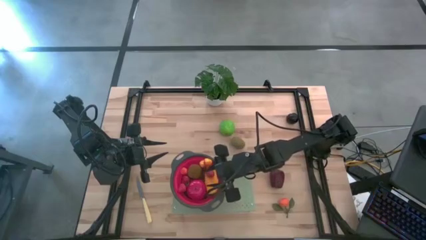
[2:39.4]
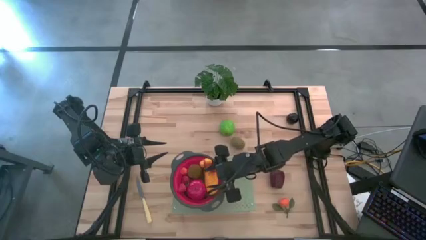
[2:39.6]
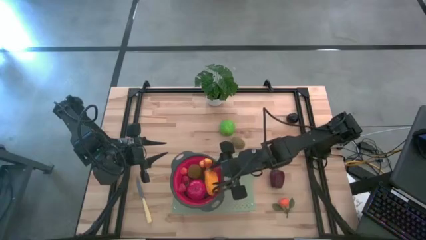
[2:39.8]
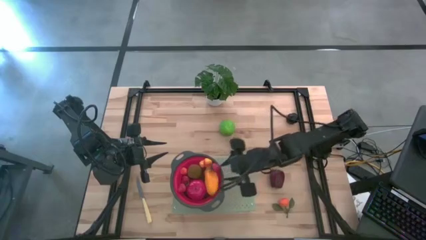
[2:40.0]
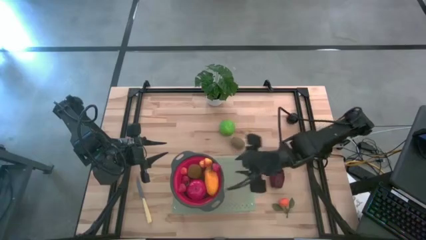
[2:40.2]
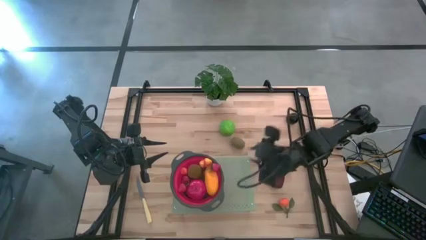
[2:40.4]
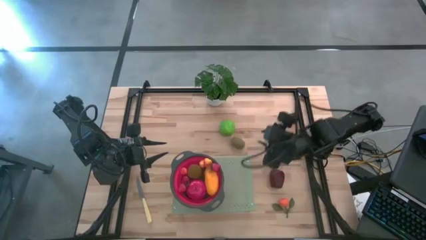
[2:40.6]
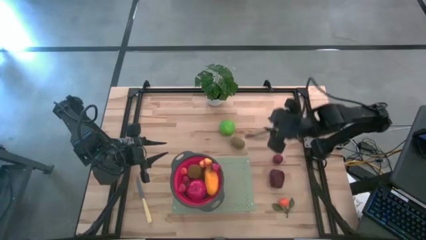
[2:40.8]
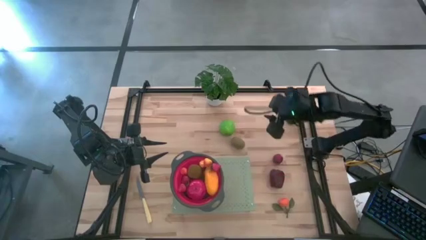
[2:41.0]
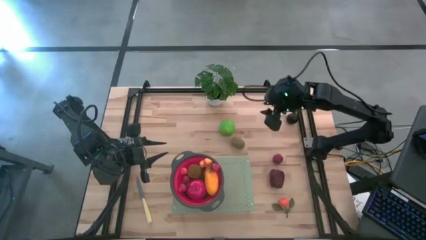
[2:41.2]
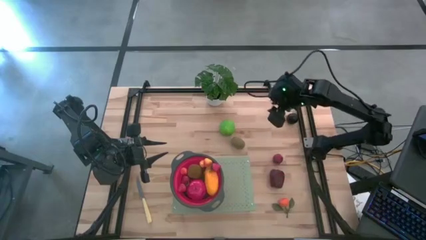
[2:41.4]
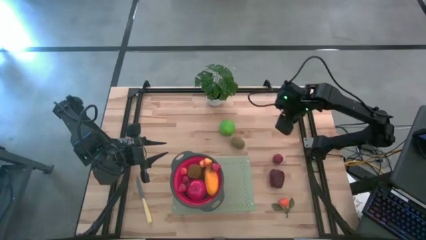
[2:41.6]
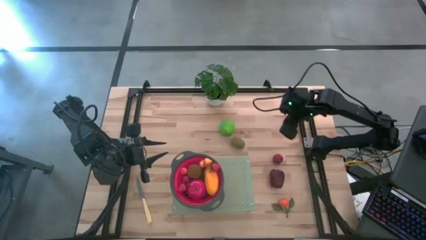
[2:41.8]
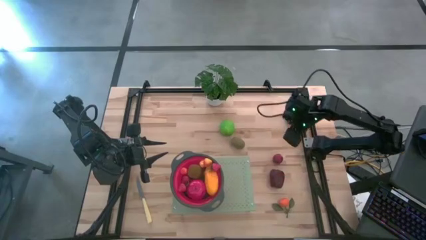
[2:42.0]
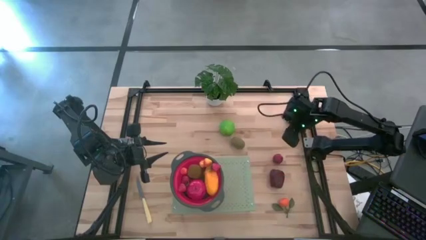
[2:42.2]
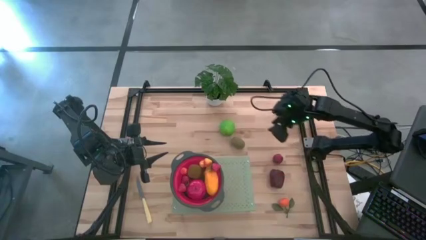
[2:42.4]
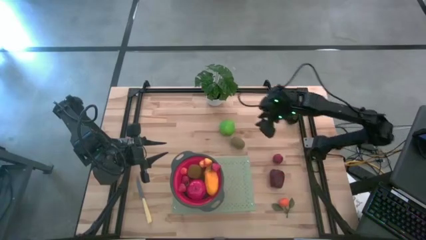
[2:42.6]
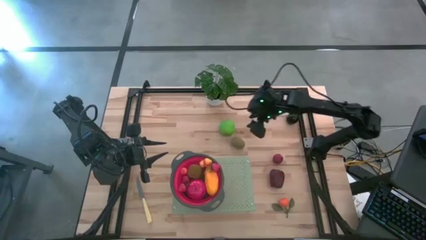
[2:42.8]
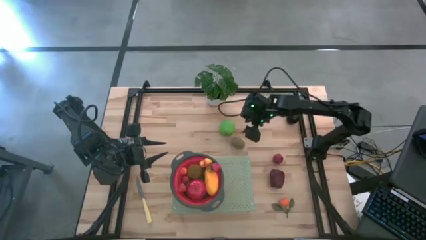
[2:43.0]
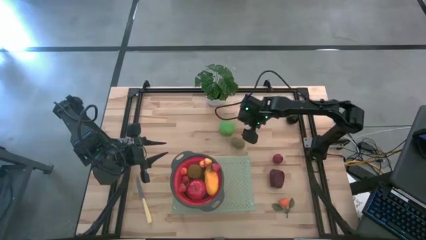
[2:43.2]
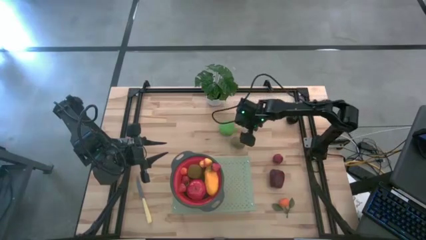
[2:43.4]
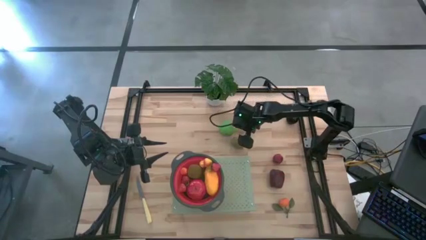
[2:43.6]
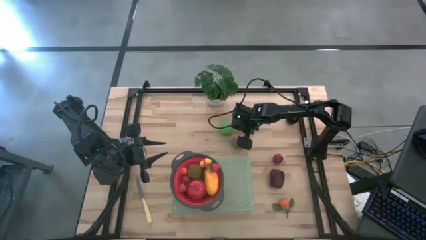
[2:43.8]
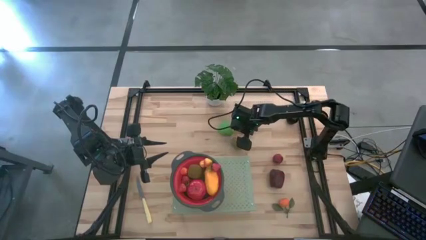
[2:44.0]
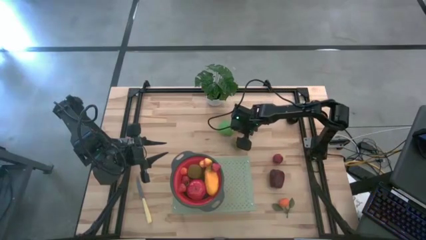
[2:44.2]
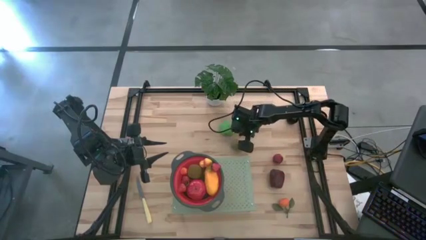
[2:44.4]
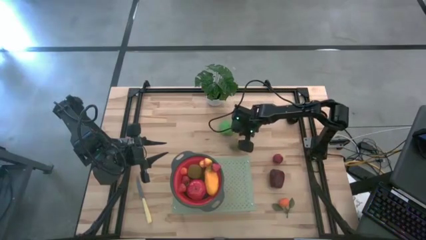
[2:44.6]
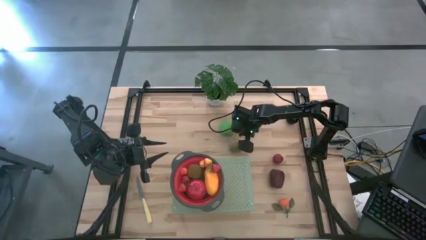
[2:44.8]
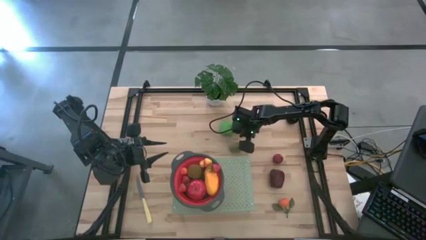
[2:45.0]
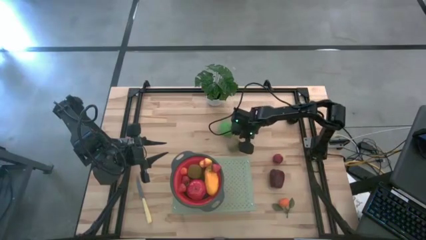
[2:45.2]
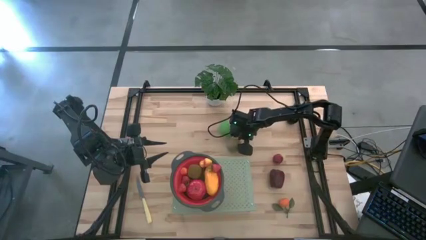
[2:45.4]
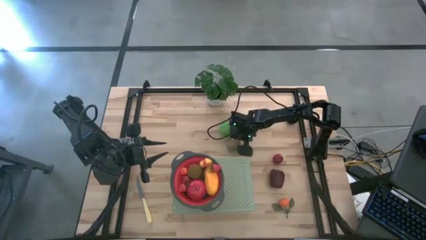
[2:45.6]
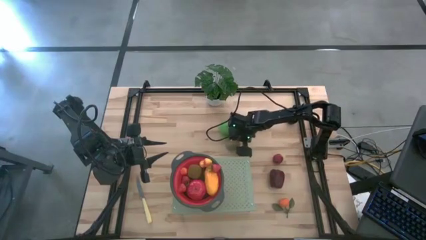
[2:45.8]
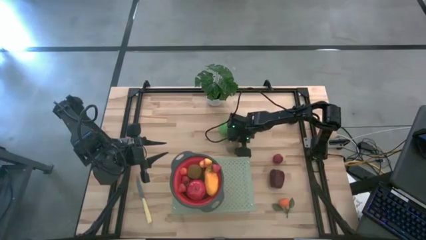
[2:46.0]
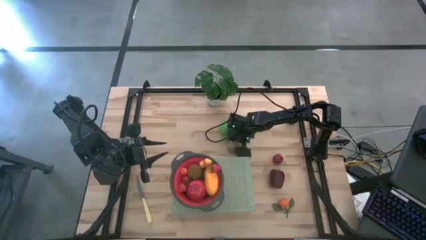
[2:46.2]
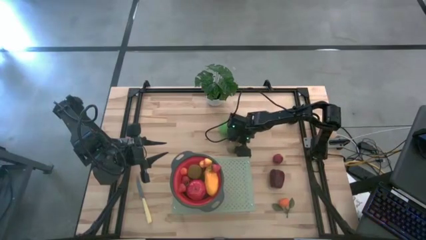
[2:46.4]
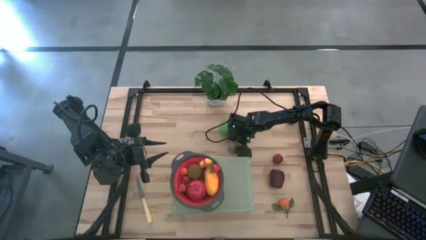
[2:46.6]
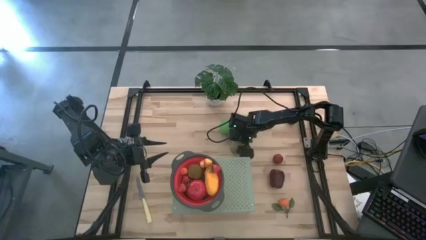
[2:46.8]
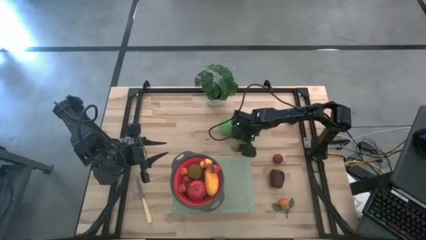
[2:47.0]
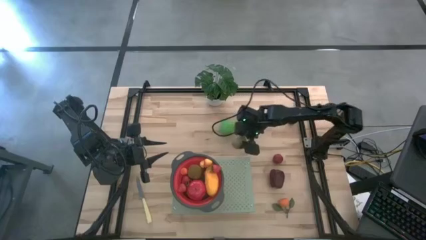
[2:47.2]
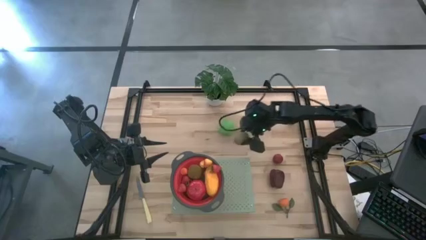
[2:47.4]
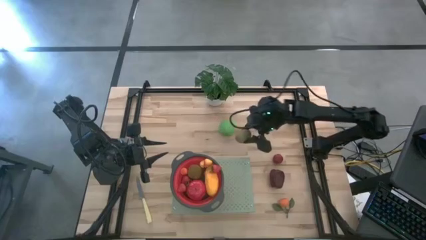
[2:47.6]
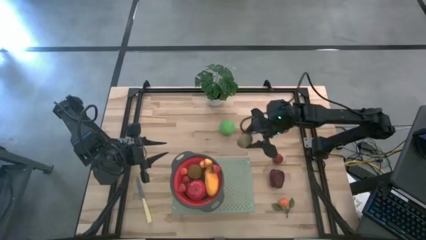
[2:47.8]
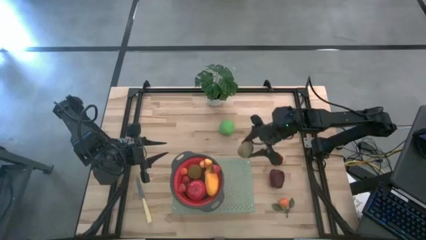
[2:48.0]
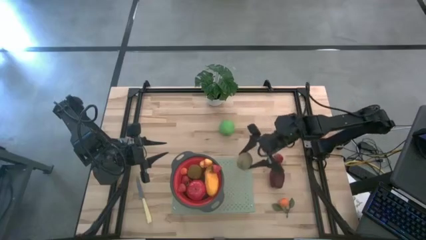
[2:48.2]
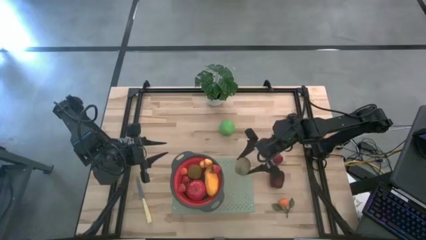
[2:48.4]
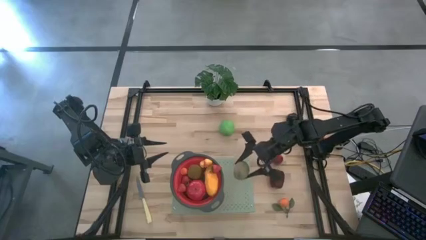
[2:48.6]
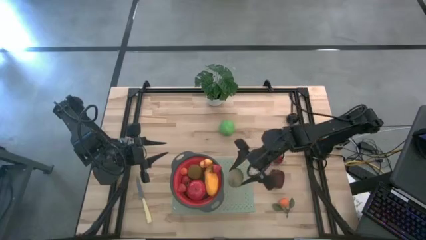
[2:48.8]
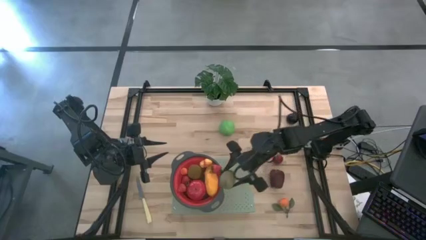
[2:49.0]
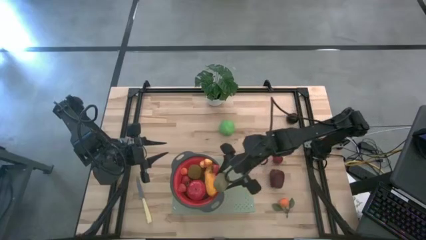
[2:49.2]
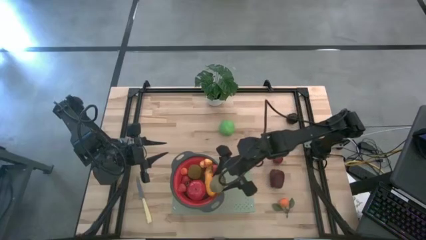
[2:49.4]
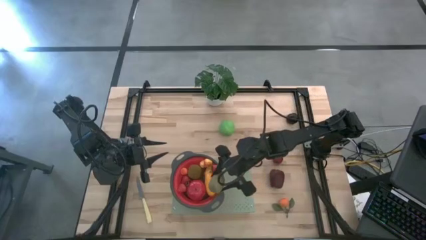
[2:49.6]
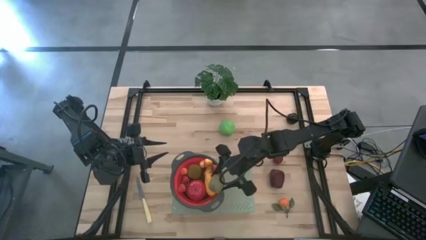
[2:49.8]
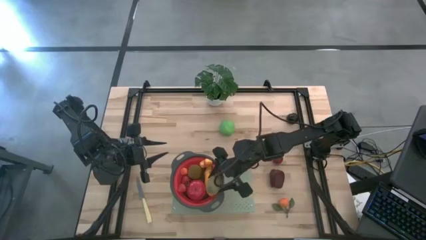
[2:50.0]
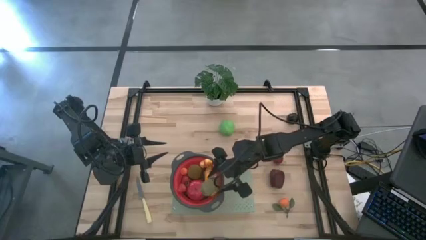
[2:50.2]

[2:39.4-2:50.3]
Task: Pick & Place Fruit
Put the kiwi into the red strainer

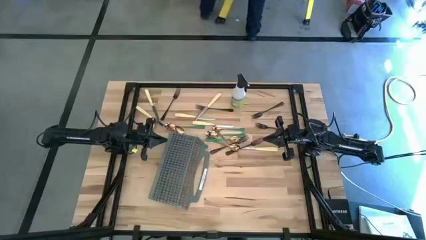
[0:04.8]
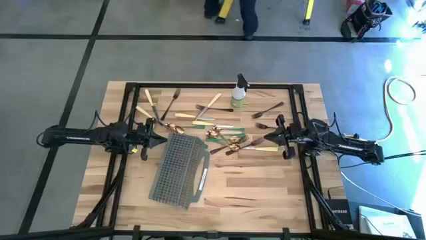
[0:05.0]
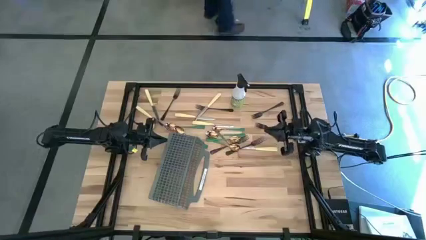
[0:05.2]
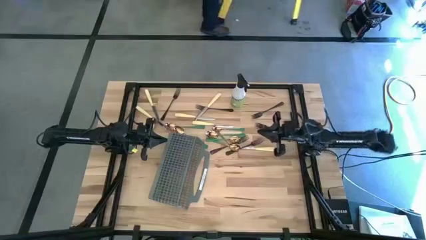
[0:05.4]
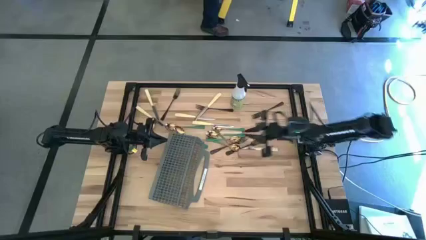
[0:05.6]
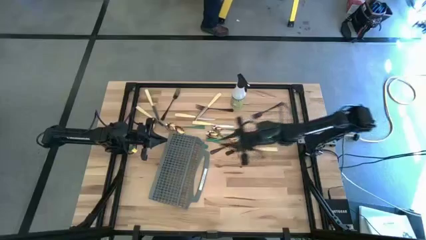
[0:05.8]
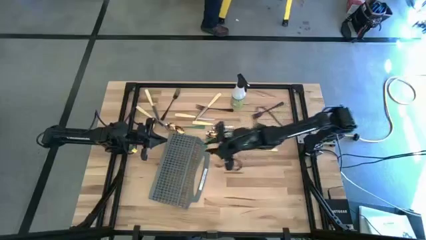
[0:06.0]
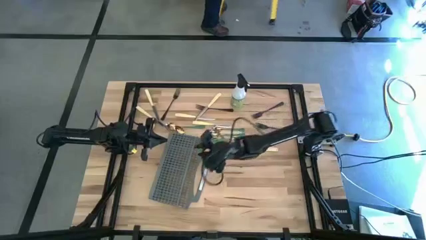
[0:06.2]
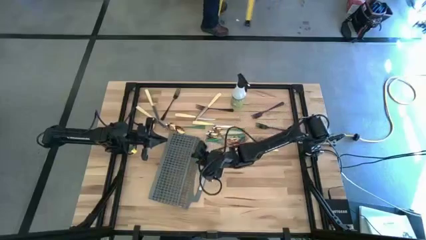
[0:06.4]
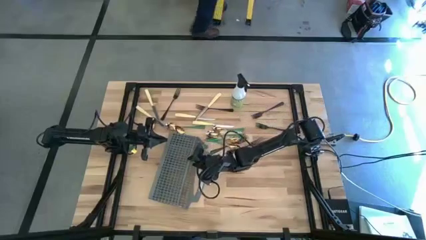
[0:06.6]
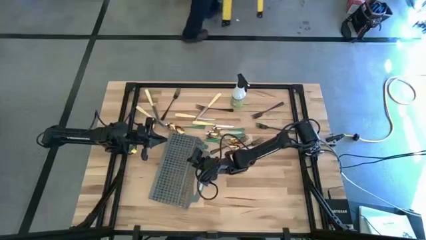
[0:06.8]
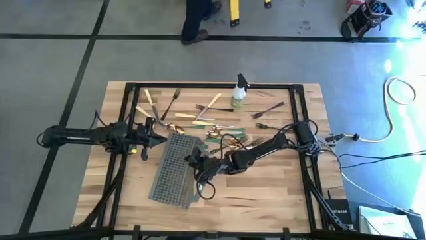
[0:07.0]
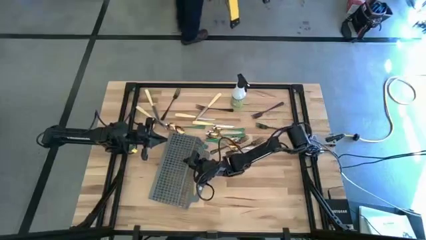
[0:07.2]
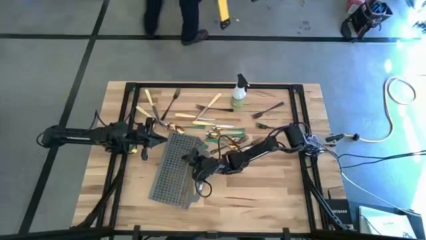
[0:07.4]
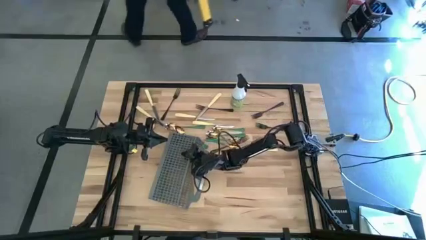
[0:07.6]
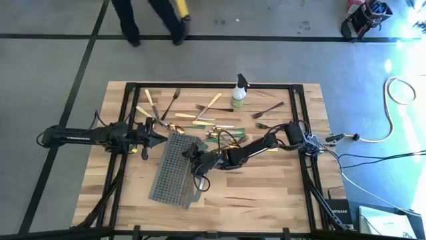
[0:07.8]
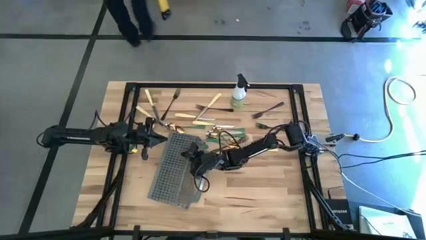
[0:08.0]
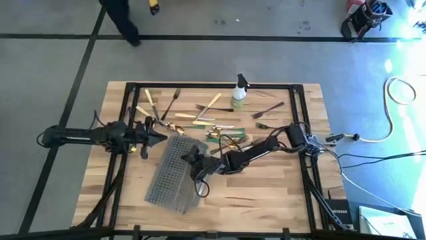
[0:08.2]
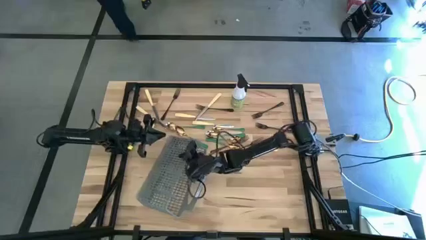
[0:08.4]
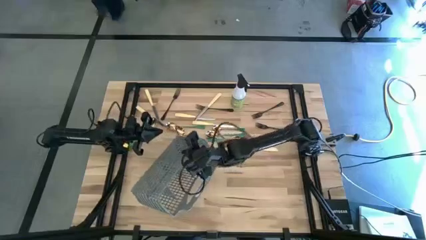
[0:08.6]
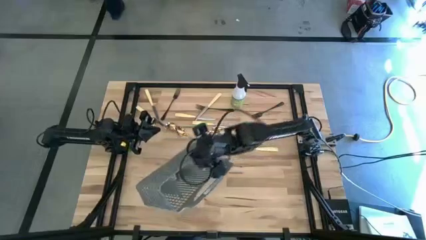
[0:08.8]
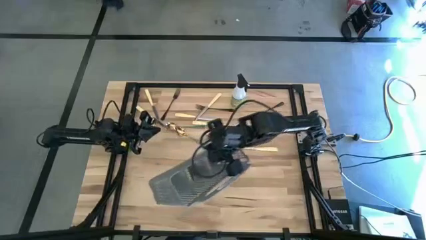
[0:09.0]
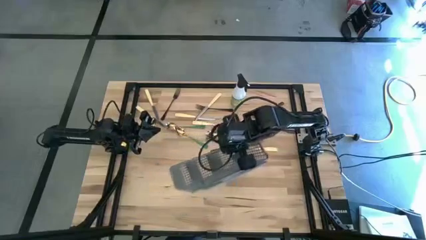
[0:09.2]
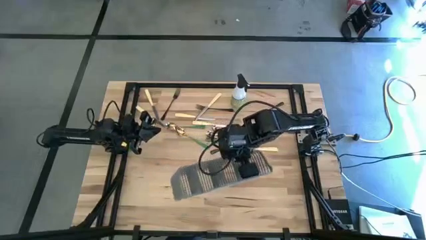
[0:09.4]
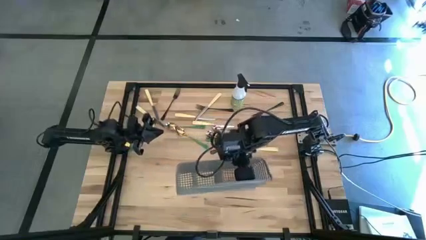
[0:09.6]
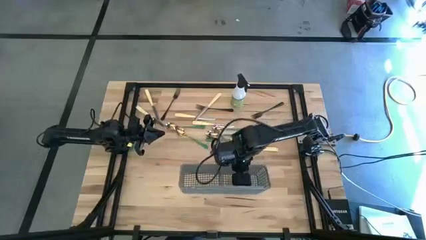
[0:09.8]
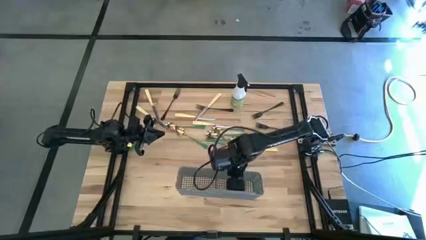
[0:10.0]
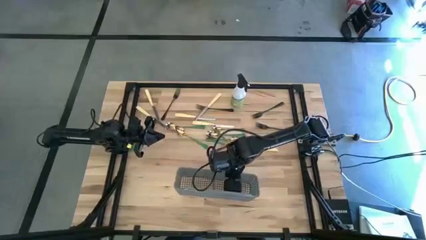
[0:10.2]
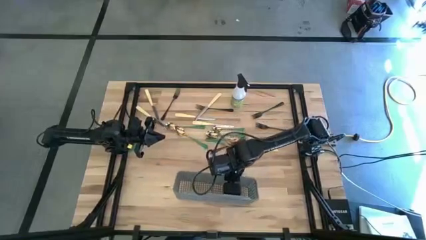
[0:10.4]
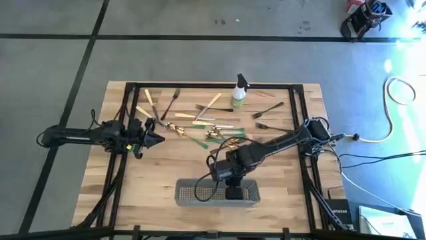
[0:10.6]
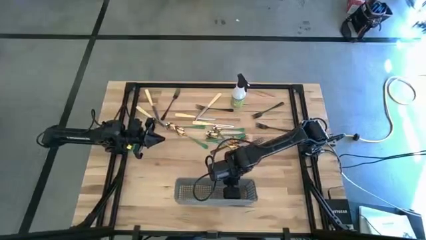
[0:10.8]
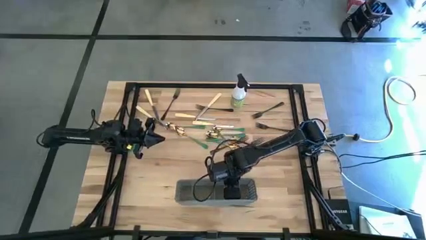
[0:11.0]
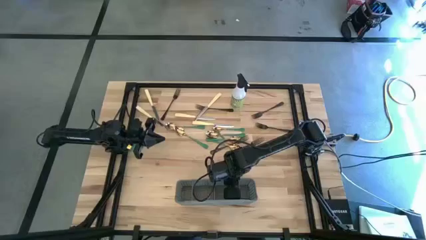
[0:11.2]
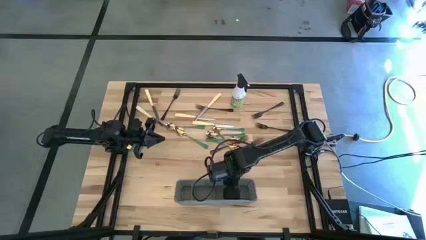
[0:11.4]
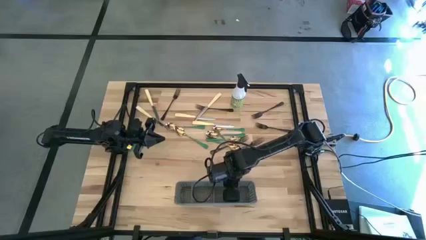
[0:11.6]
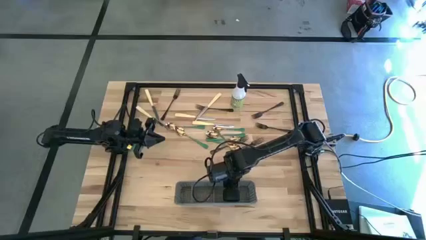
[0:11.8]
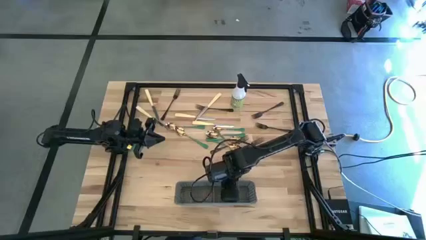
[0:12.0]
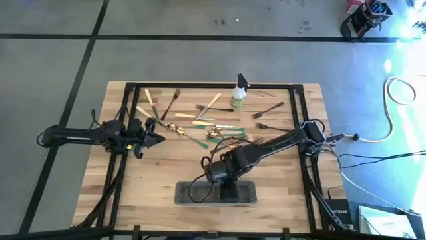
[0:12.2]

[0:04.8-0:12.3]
Task: Sort silverware
Adjust the gray cutlery rack from a lying position to a standing position
